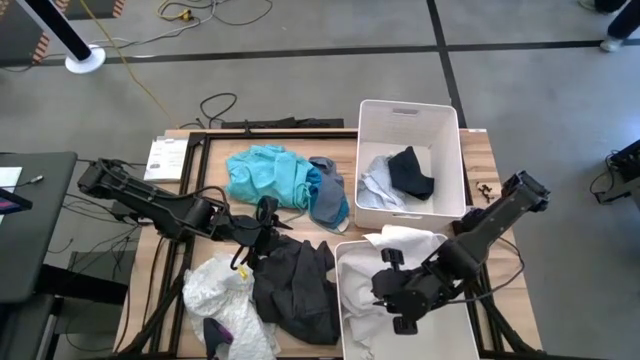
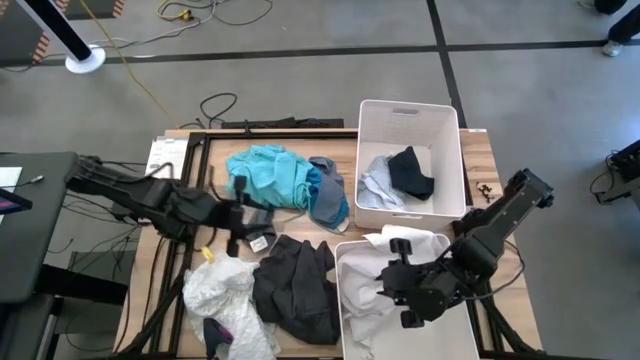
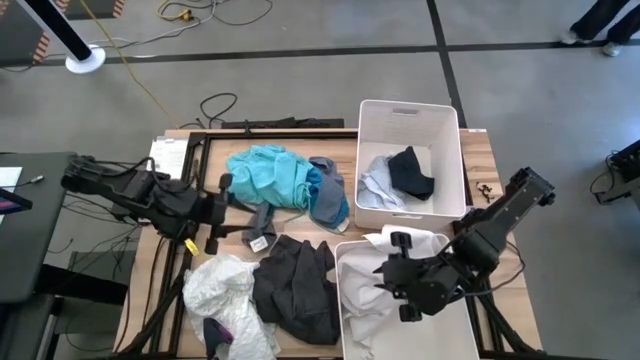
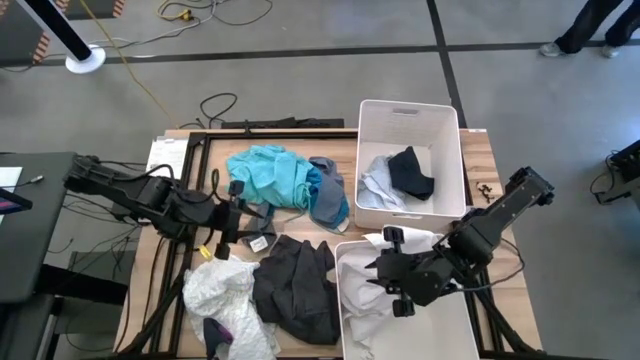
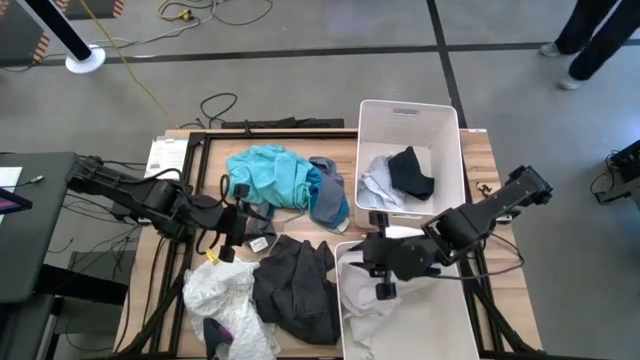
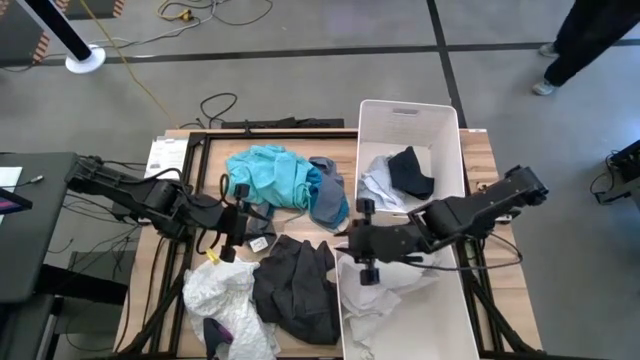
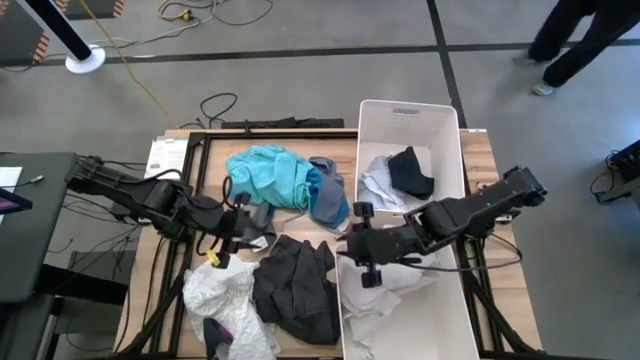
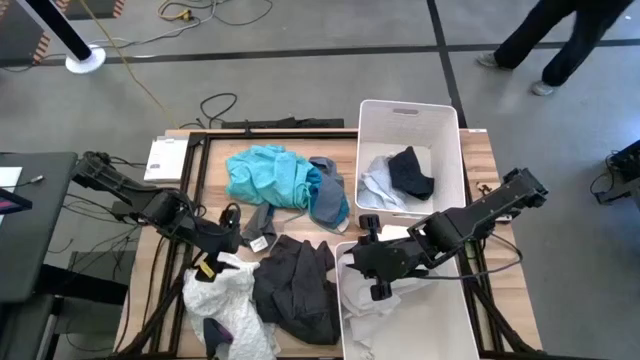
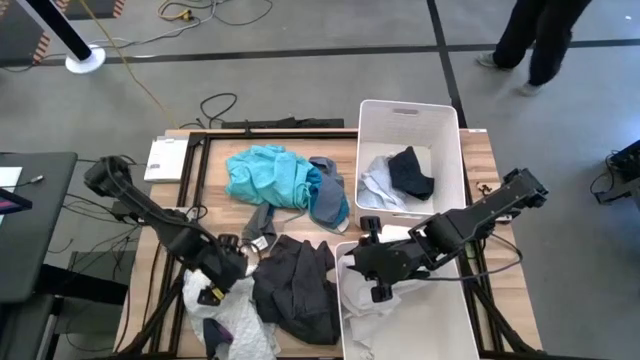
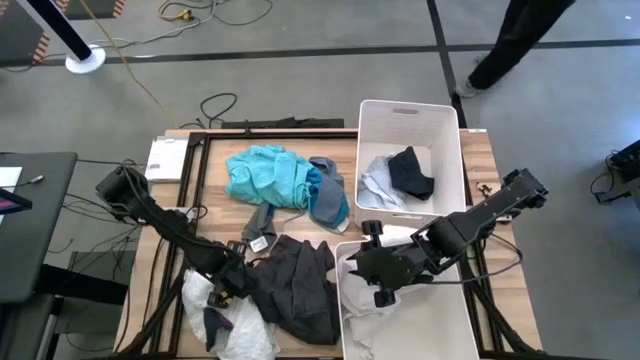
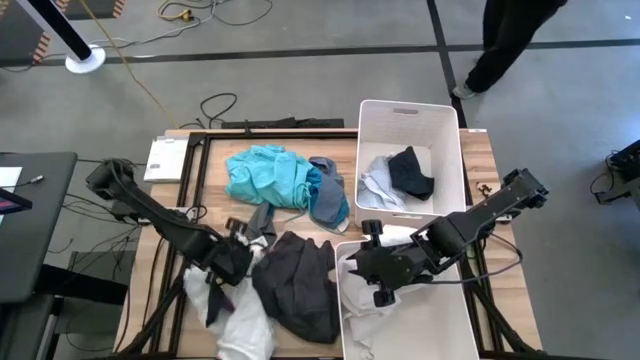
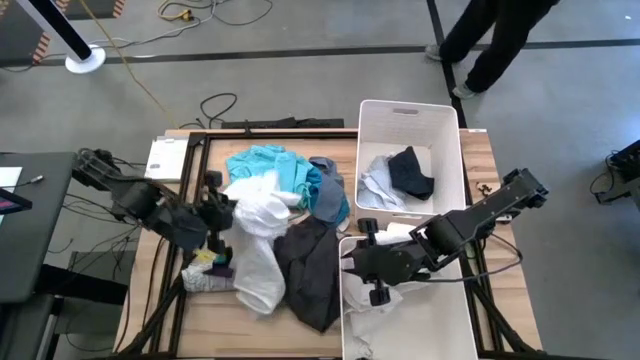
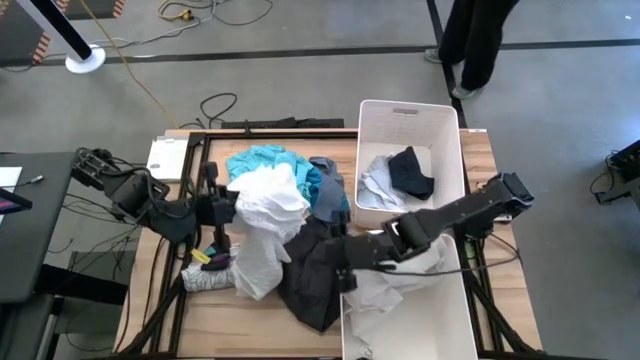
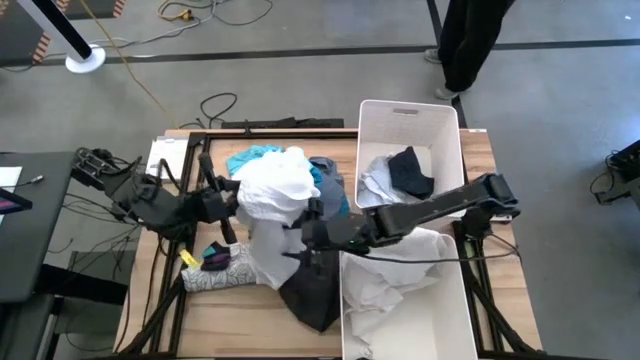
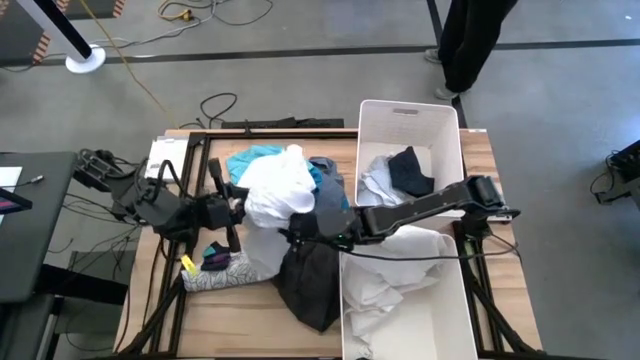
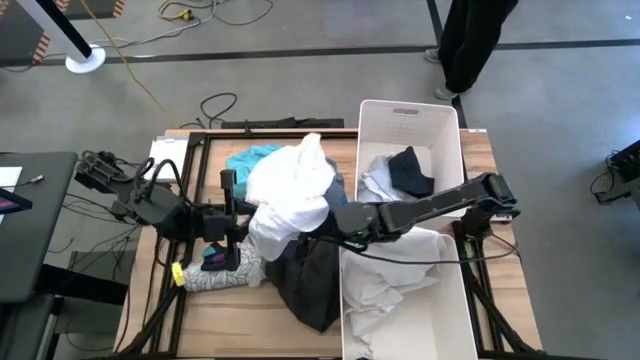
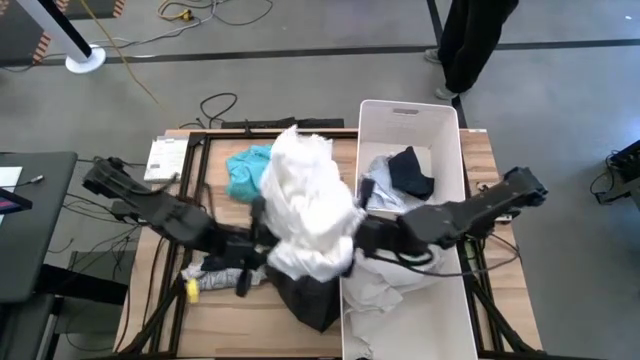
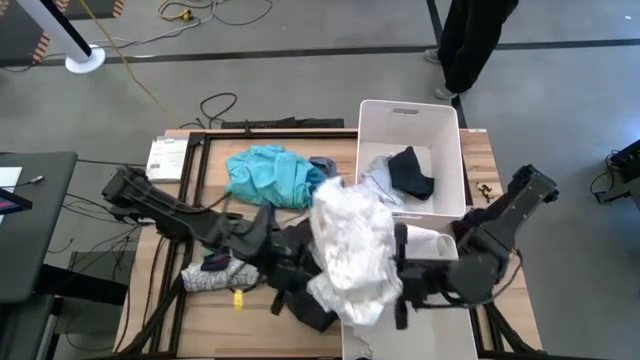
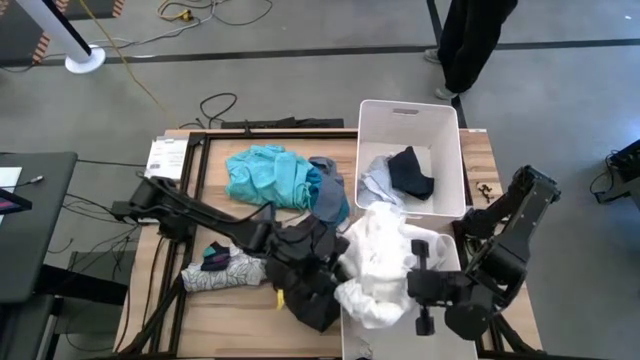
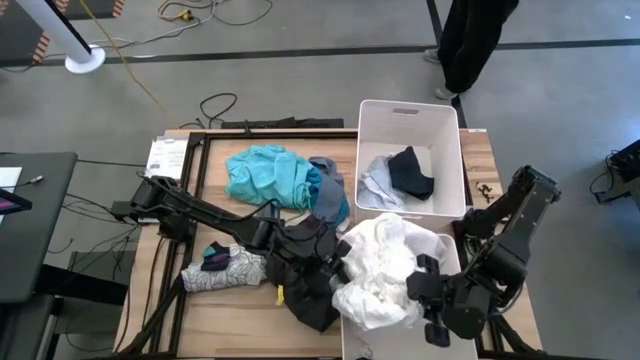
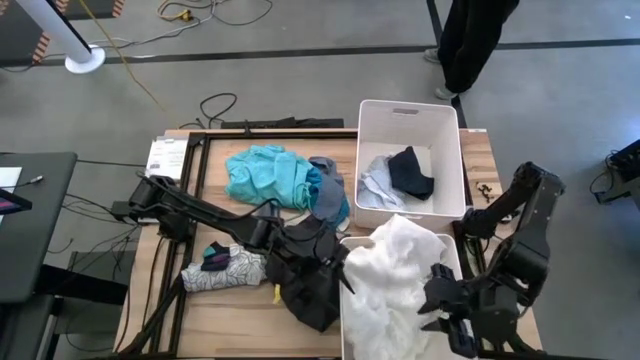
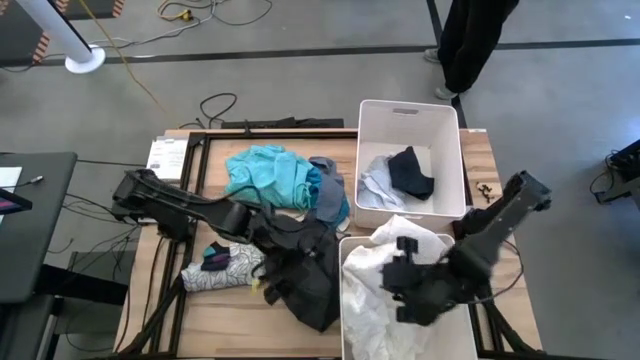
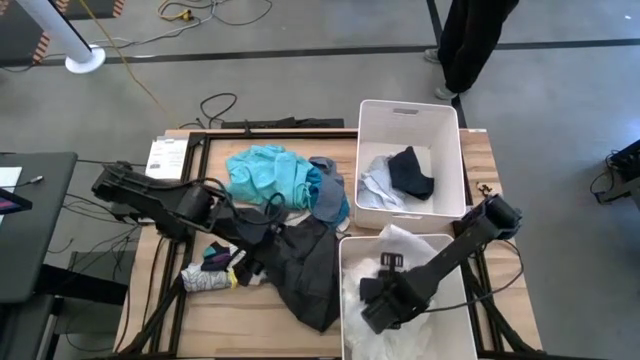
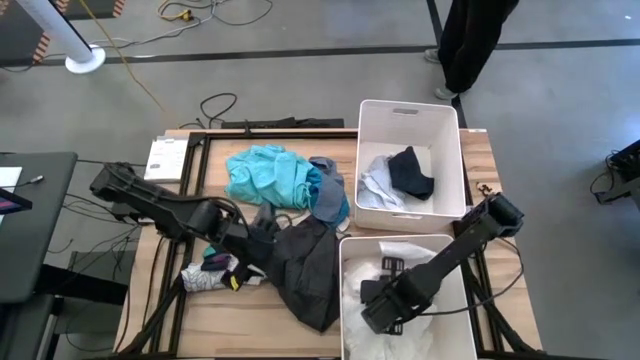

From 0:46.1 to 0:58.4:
Task: Sort clothes
Put the white shirt into the bottom white laundry bin

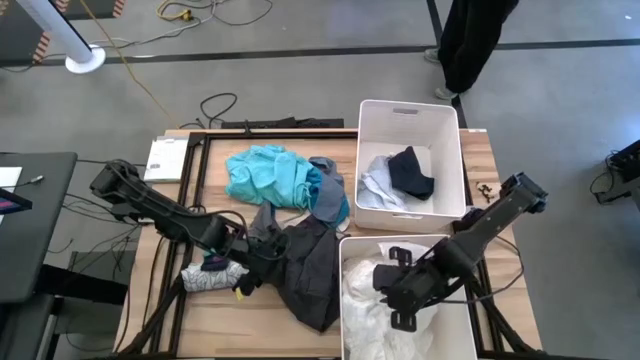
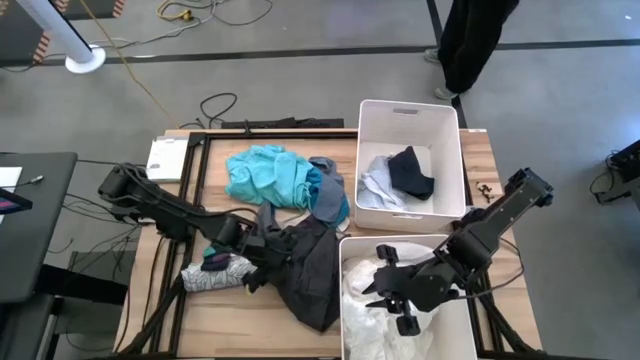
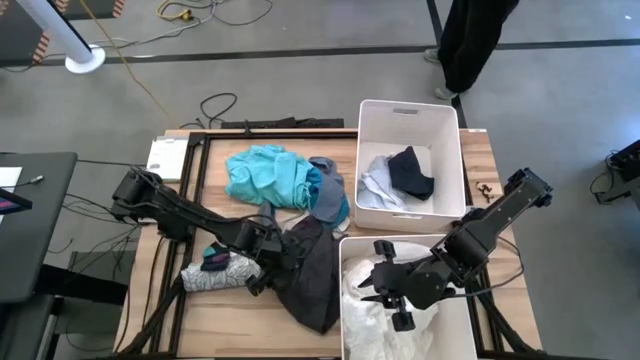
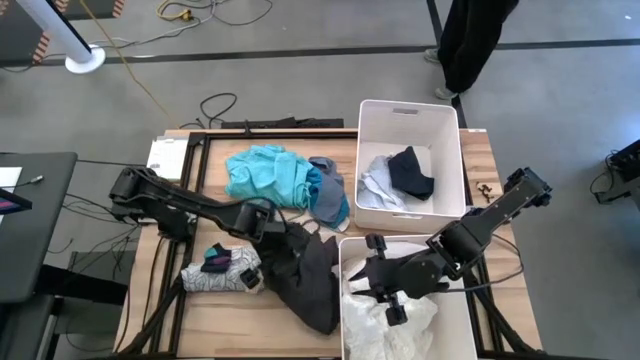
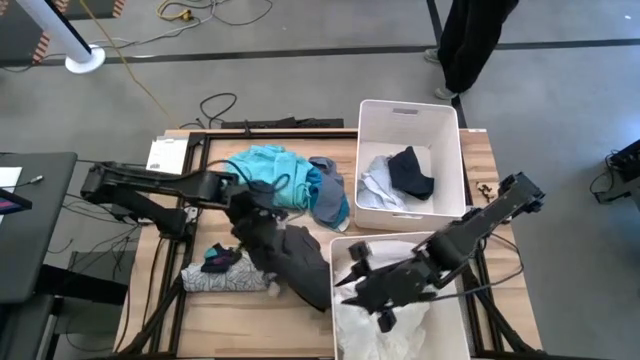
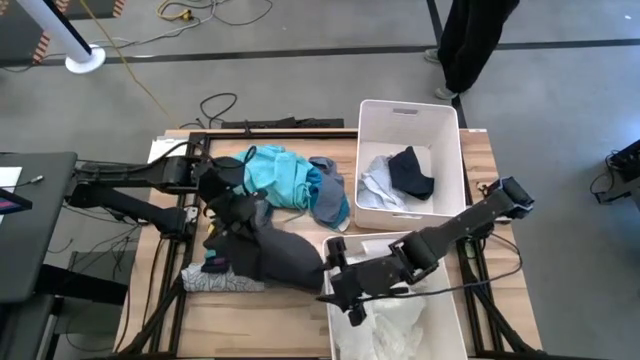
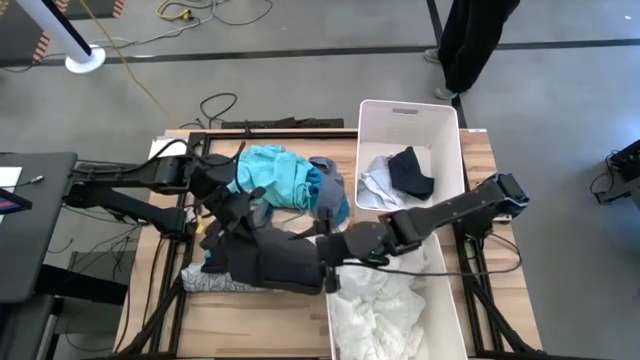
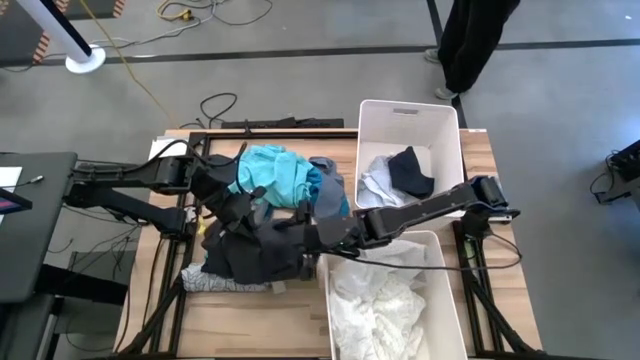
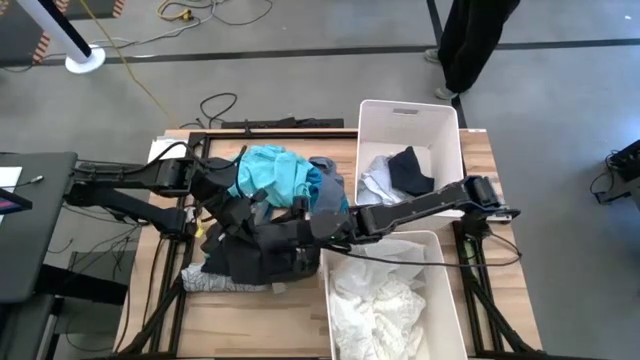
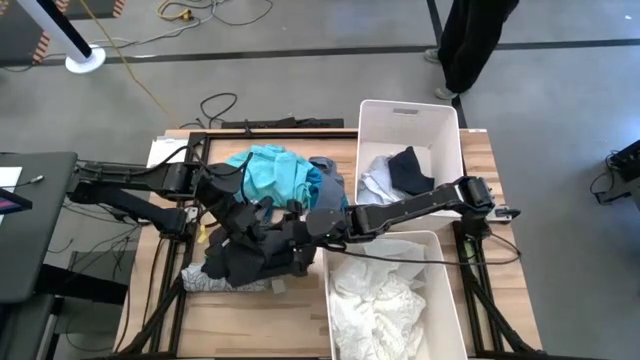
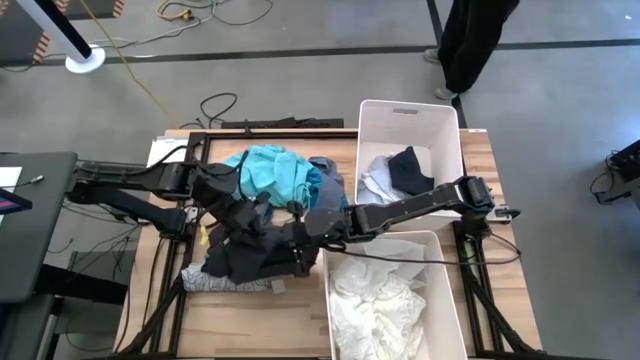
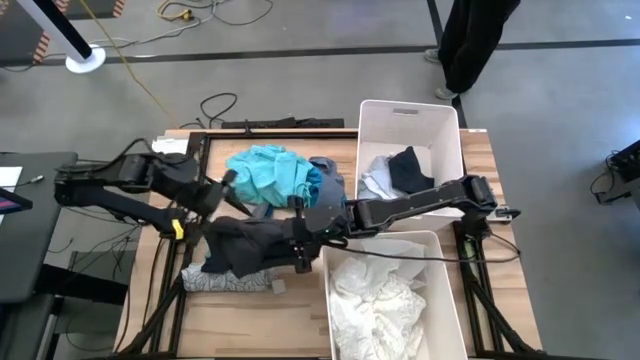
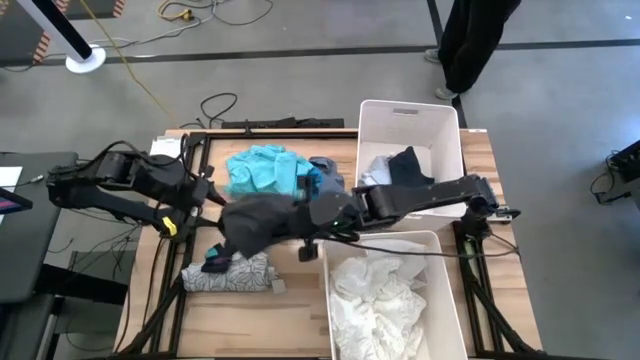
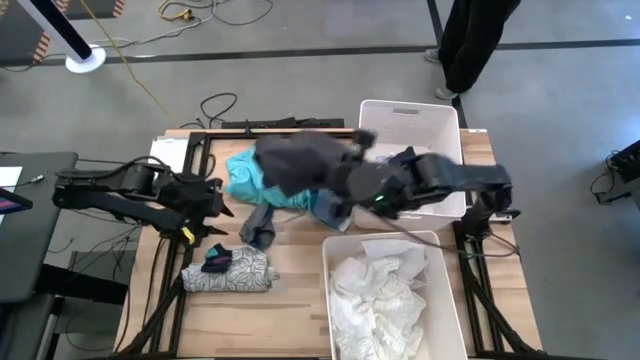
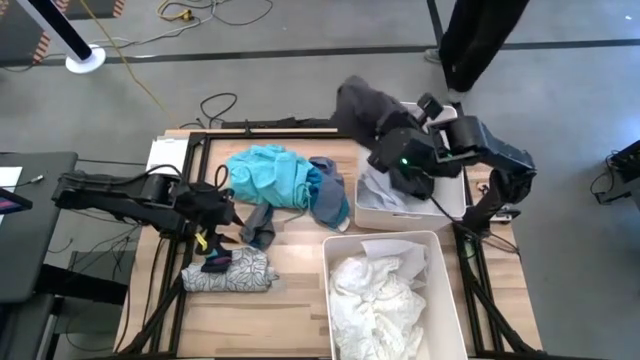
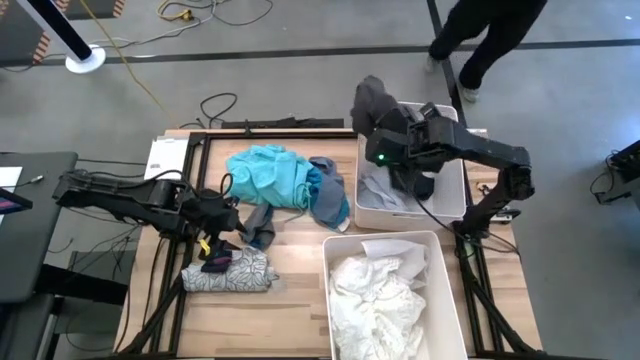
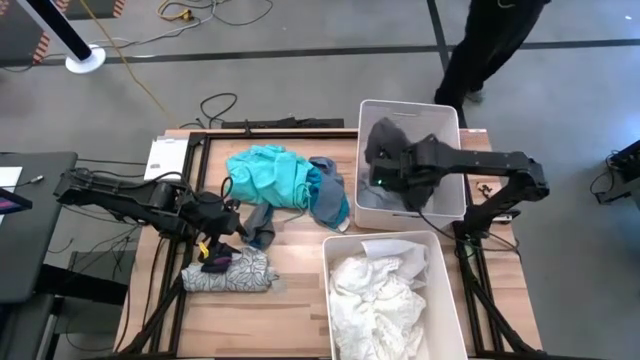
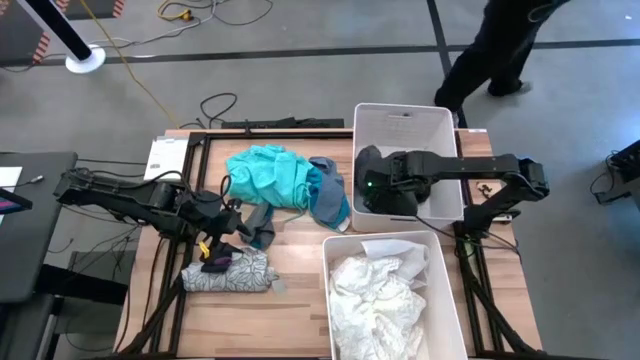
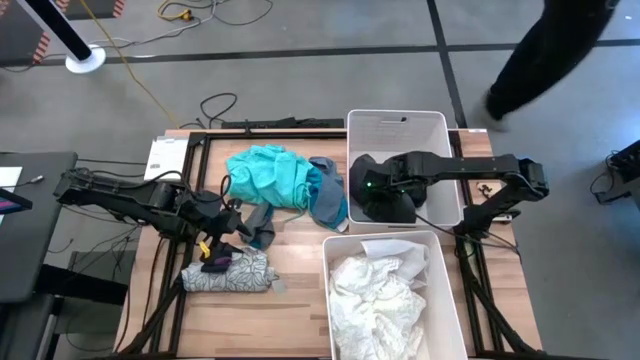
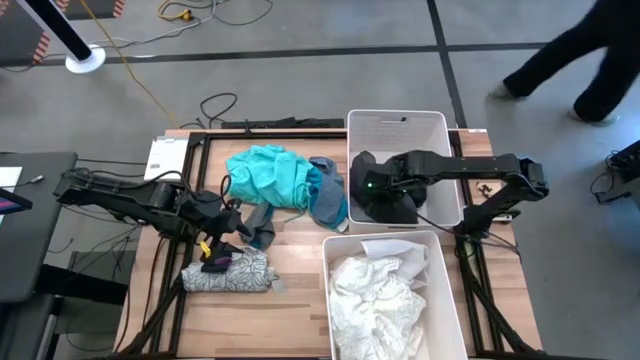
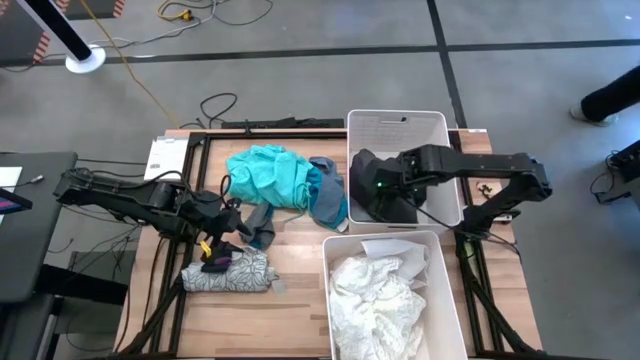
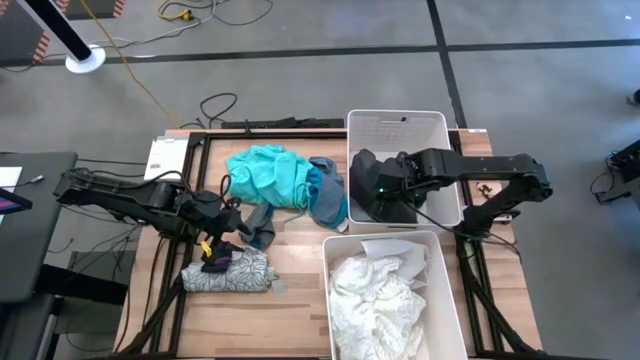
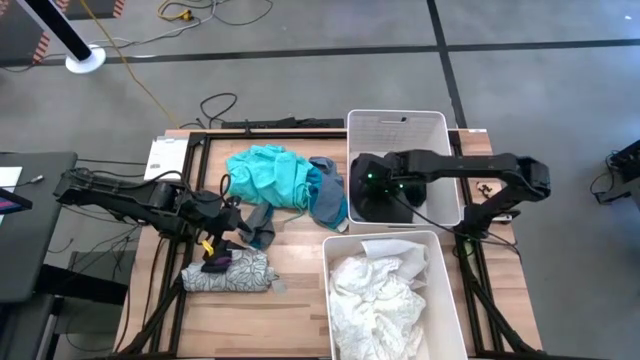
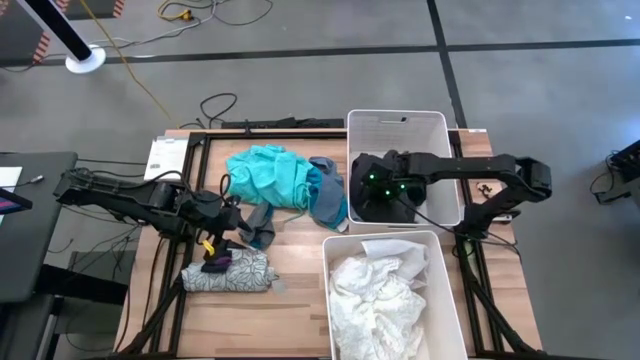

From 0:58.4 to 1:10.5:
Put the dark gray short into the top white laundry bin
